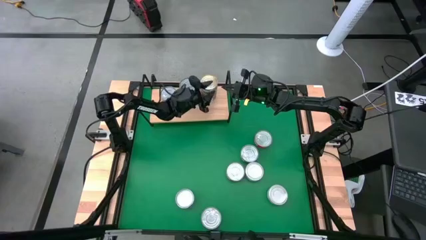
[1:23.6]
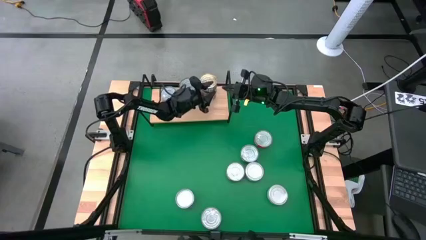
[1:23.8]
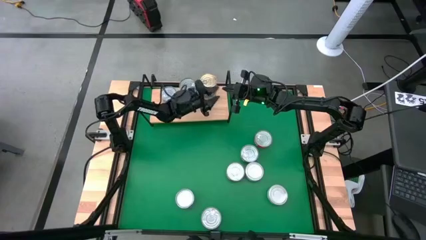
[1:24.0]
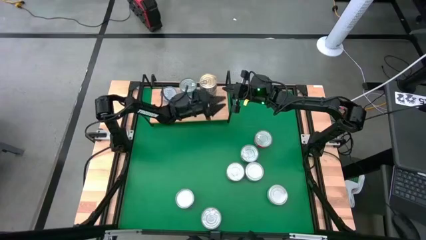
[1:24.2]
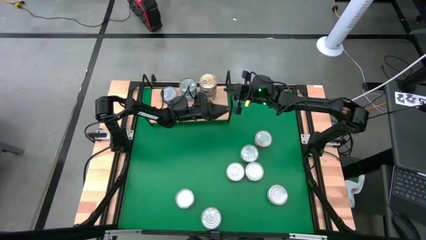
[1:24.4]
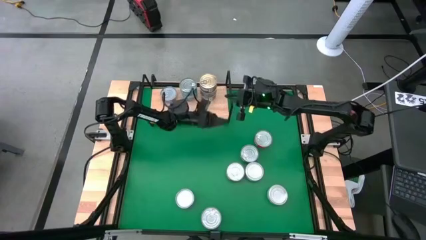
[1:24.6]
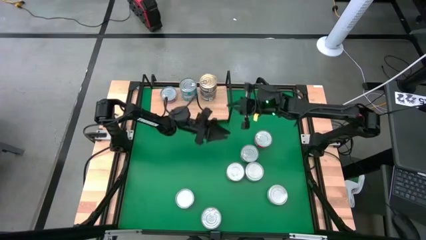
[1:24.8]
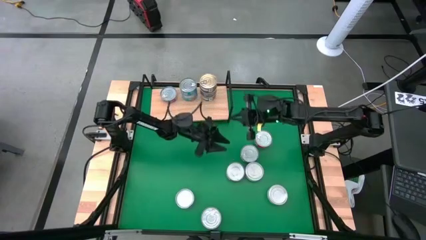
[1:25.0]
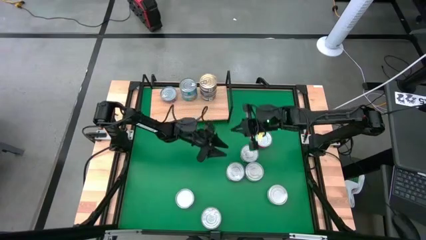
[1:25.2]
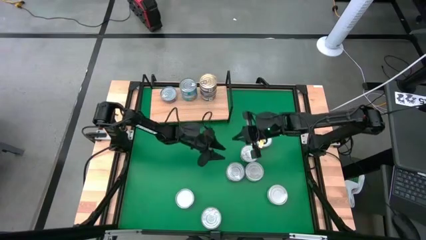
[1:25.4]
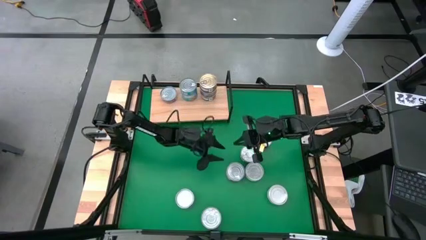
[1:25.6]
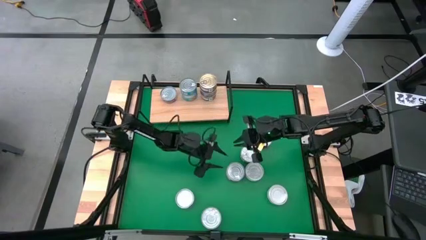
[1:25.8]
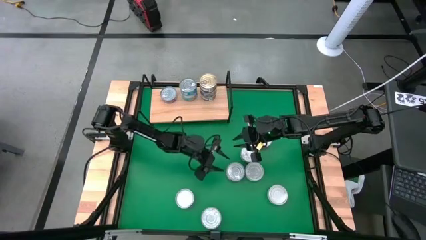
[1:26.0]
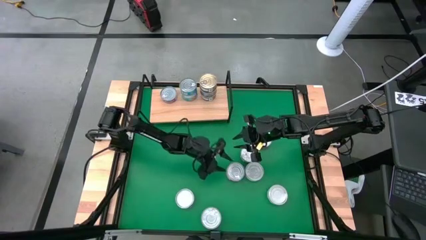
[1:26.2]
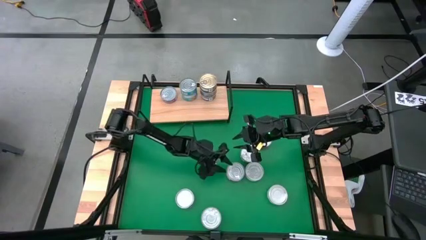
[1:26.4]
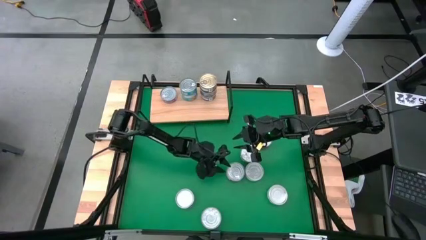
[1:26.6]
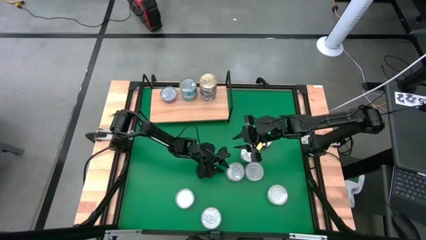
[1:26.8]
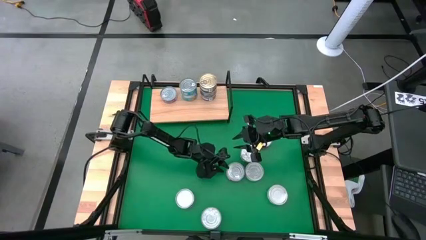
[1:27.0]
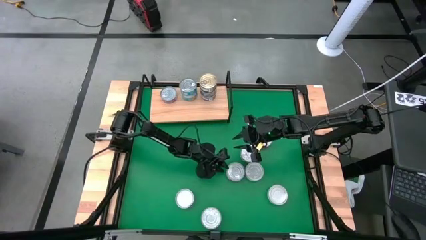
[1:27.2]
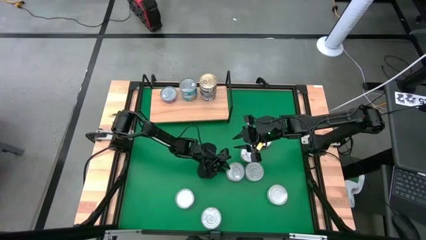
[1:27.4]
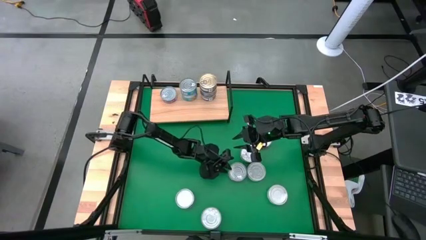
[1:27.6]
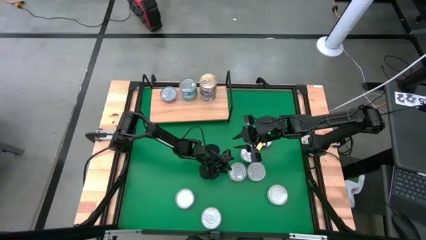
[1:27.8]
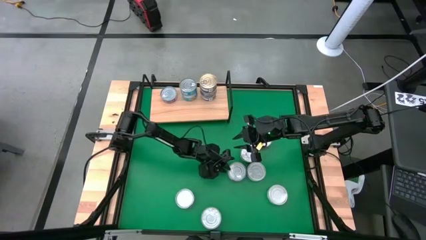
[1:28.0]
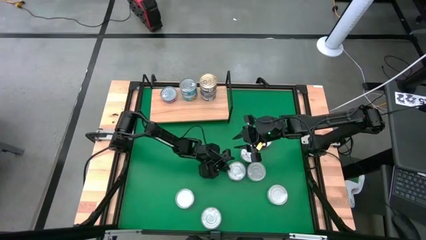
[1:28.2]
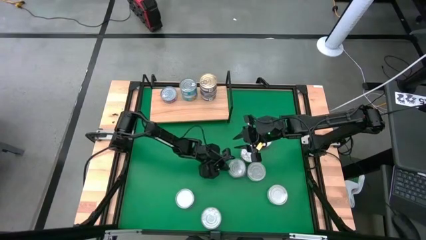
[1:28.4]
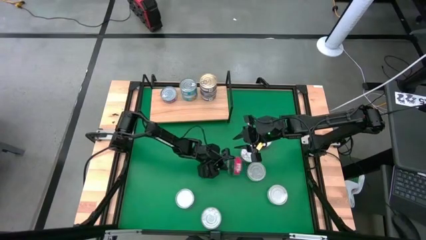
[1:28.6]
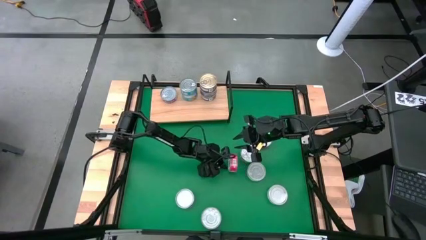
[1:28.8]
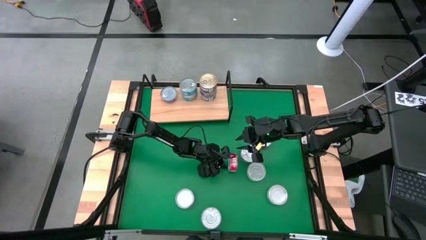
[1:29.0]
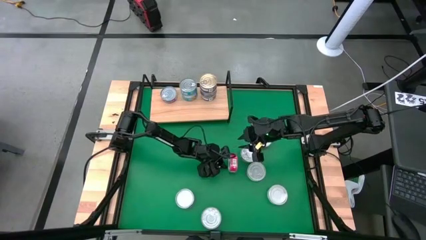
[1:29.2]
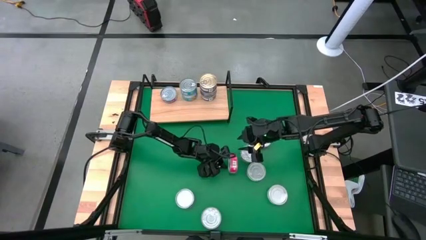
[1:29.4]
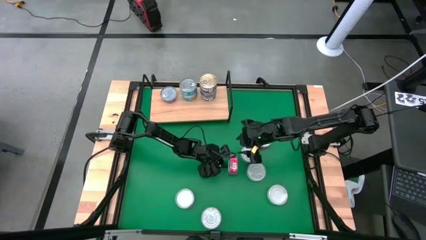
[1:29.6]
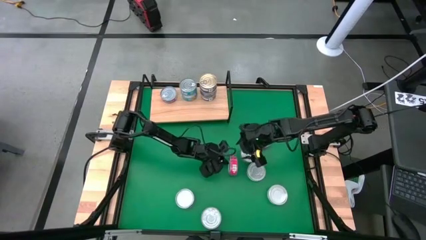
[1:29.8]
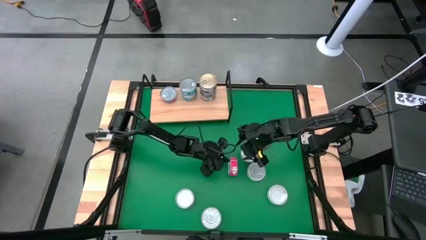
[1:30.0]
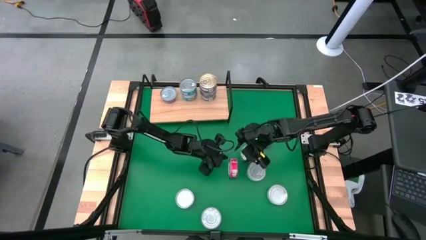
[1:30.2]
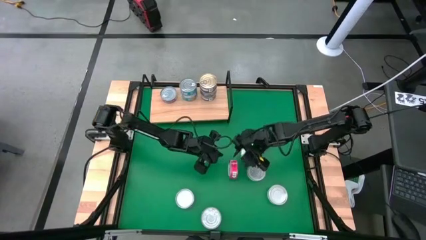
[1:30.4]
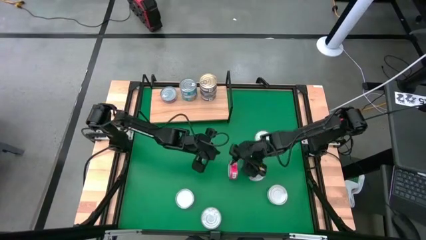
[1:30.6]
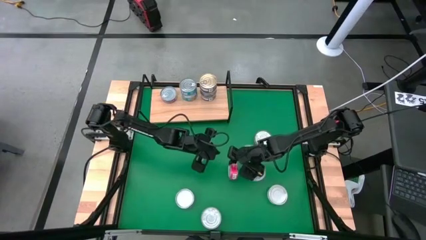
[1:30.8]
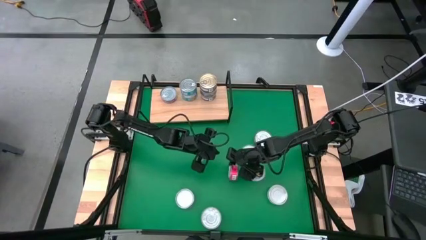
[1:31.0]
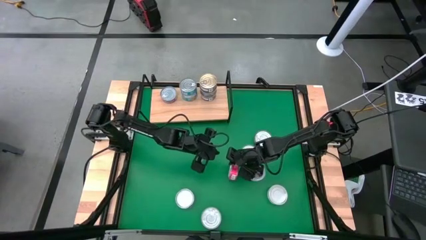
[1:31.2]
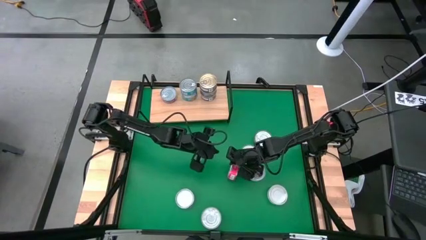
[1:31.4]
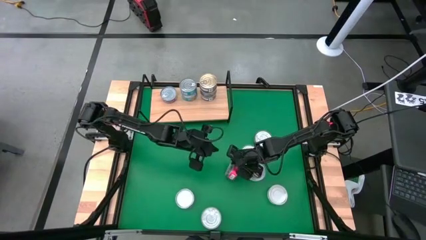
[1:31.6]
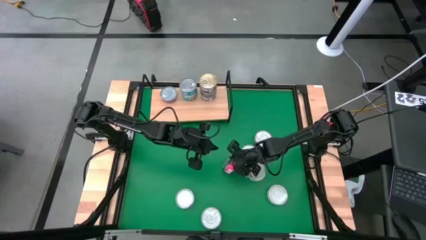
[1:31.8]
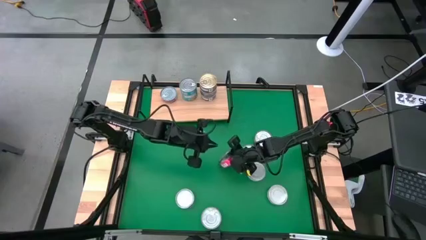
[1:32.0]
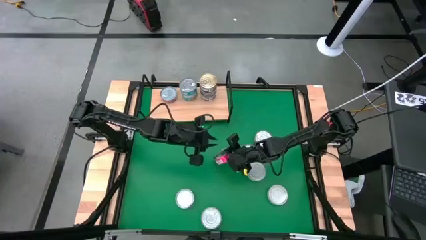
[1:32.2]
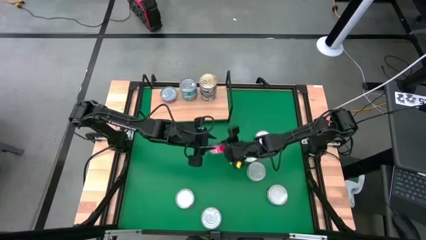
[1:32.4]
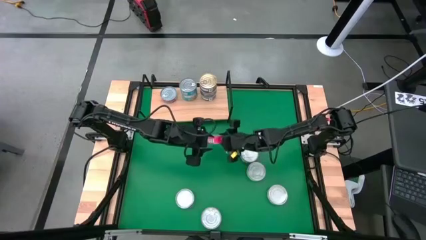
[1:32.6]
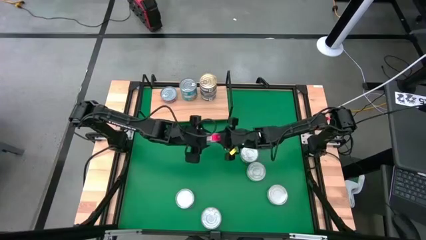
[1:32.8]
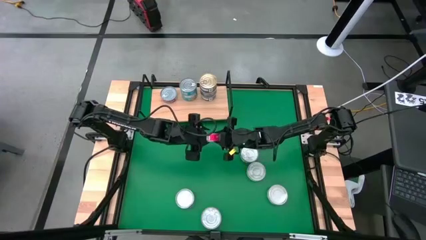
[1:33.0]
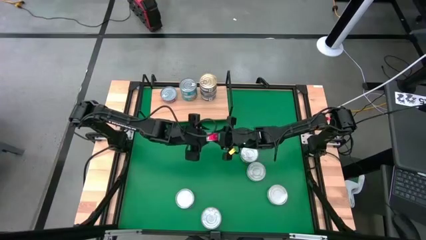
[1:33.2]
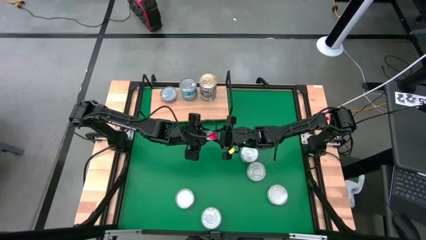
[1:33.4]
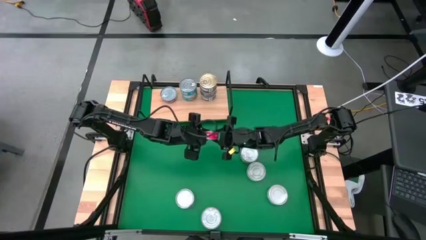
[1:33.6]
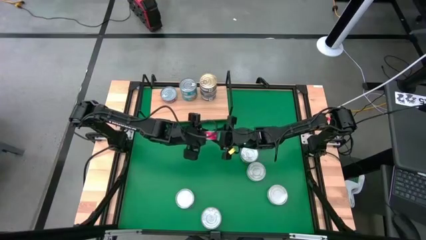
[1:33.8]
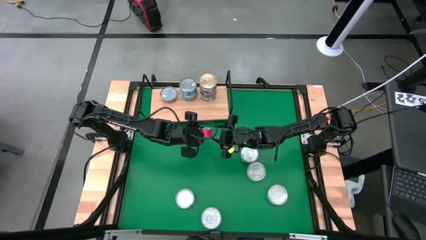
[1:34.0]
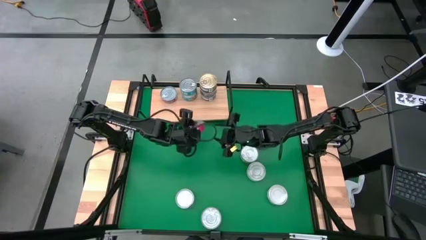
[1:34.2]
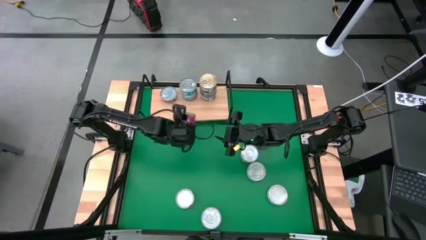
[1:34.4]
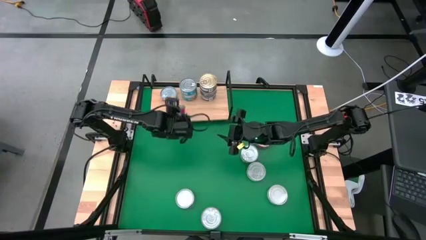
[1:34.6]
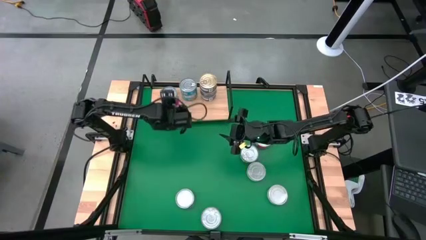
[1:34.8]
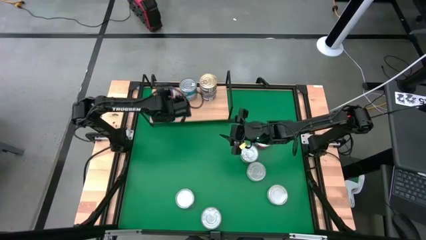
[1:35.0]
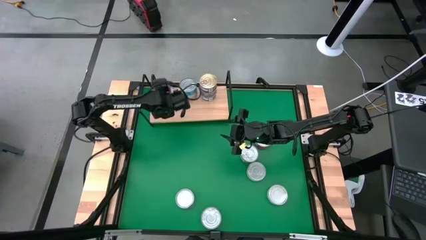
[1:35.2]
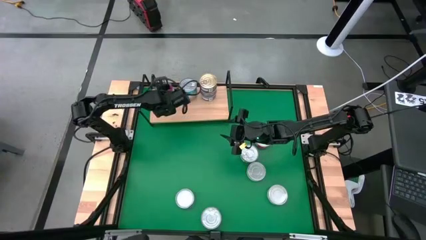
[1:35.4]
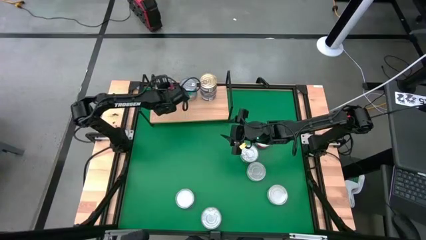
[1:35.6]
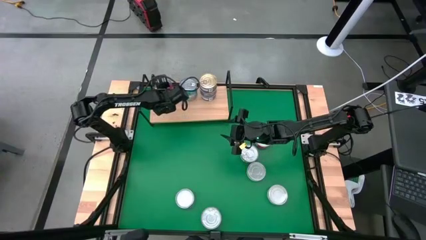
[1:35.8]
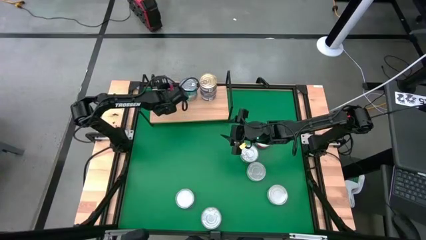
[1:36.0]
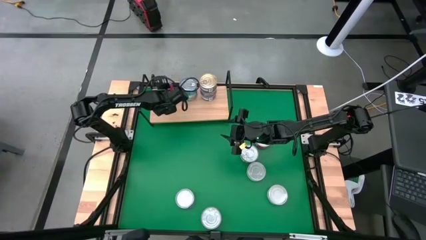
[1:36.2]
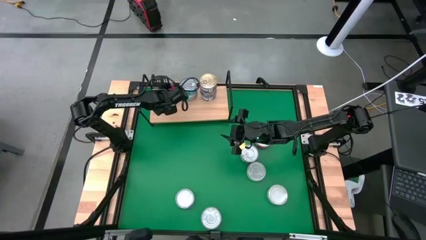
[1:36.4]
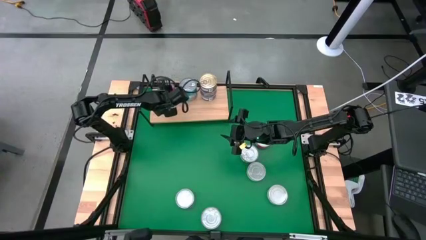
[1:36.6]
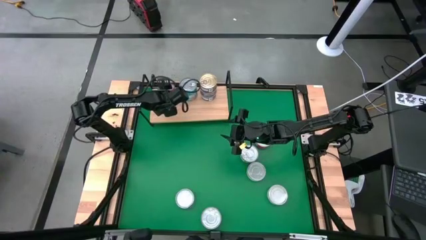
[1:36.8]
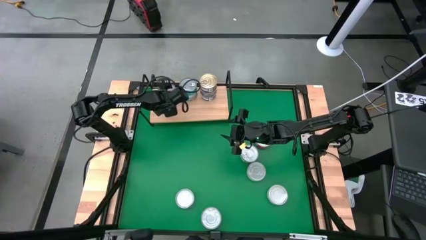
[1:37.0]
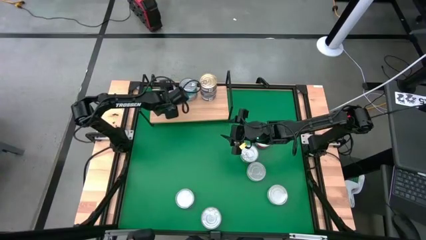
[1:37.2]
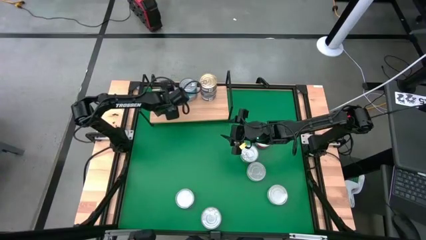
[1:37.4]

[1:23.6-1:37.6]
Task: Stack canned seafood by type on shelf
Stack the red tuna can on top of the other red tuna can on the shelf

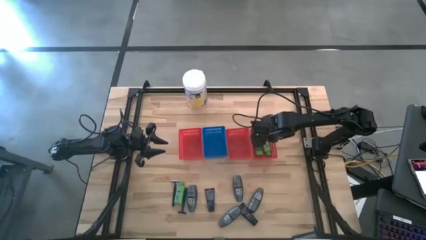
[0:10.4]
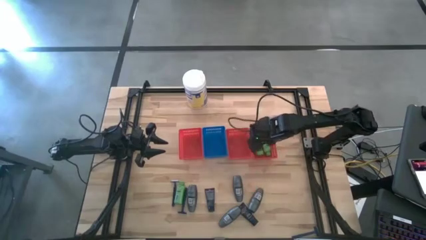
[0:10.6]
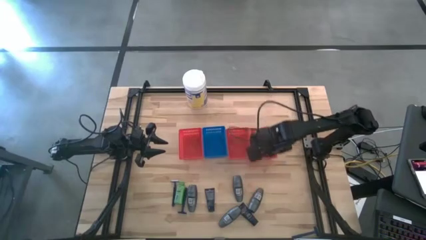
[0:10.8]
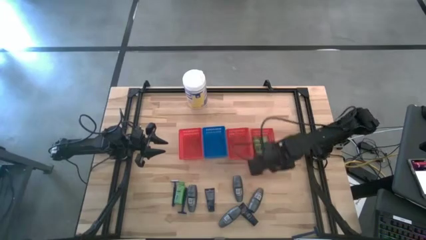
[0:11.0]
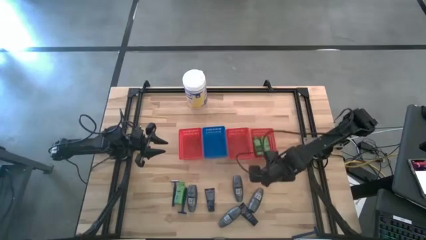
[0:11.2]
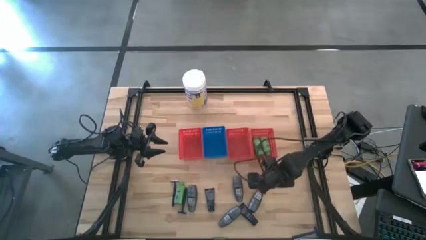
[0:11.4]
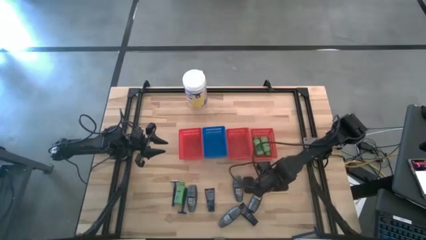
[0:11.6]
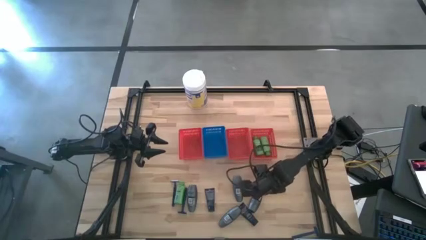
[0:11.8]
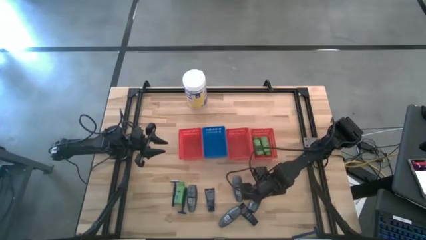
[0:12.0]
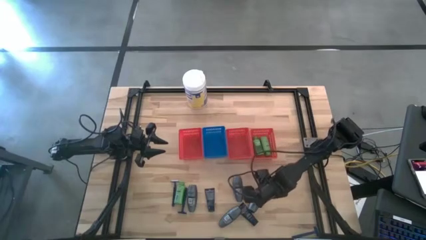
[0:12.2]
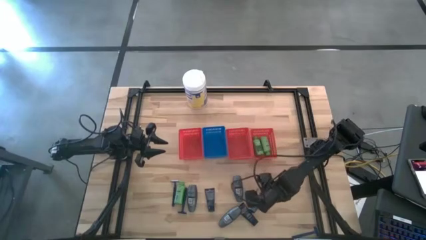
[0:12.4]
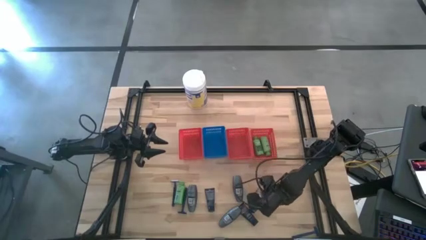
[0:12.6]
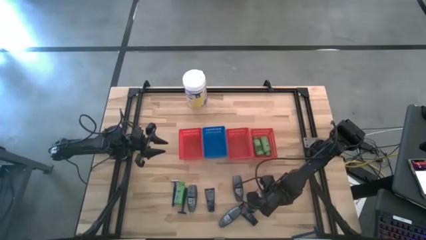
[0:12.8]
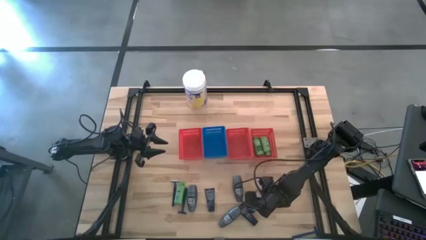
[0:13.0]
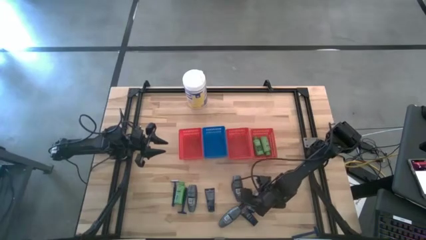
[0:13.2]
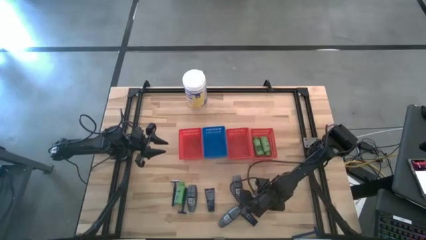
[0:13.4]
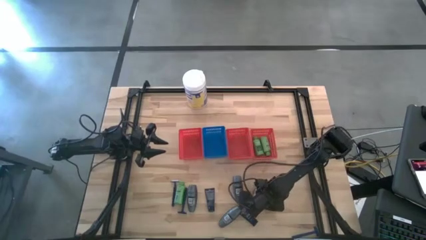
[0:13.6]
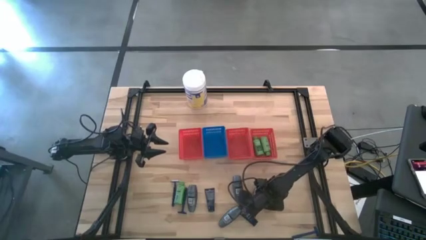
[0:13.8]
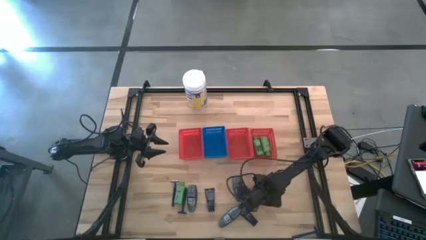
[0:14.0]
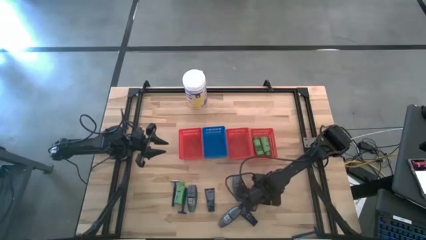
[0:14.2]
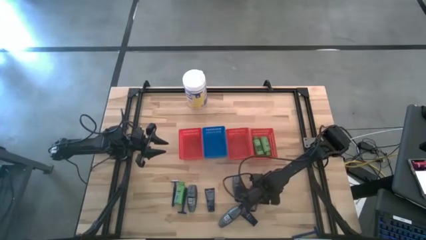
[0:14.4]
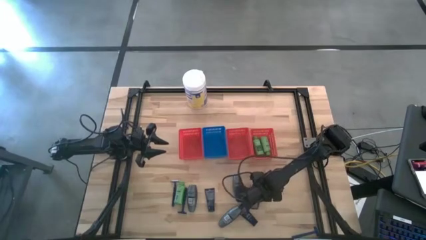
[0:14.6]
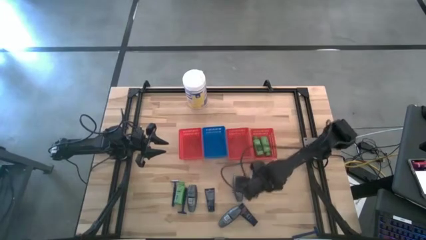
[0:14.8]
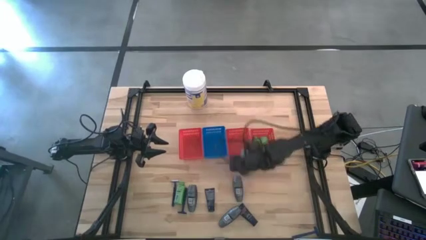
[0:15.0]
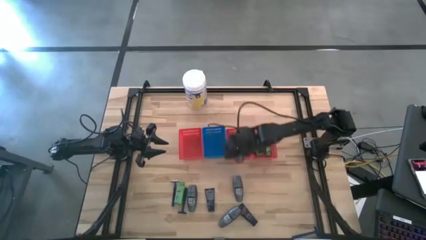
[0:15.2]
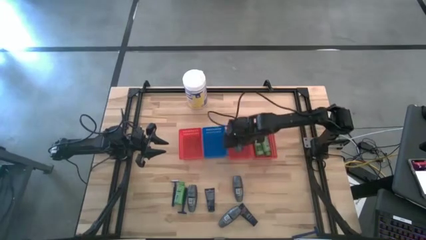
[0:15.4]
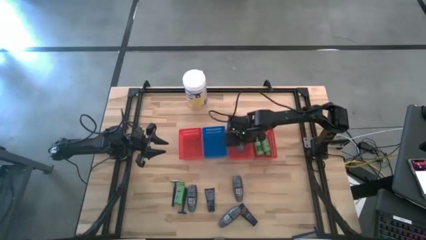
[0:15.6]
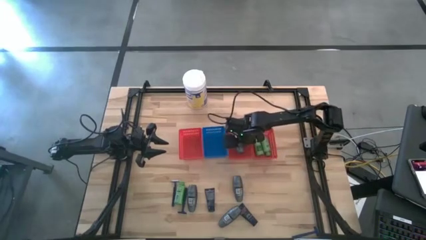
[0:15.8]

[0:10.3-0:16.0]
Task: Pick & Place Travel size toiletries
Put the top right gray deodorant into the middle red bin
